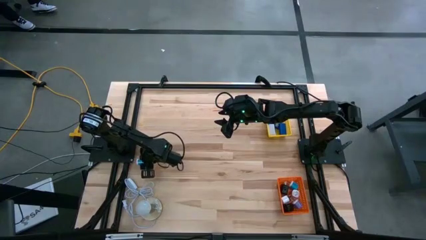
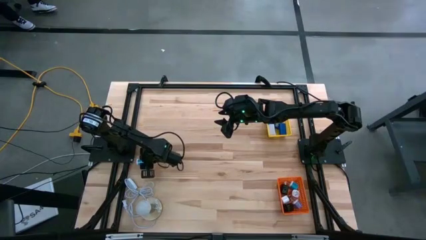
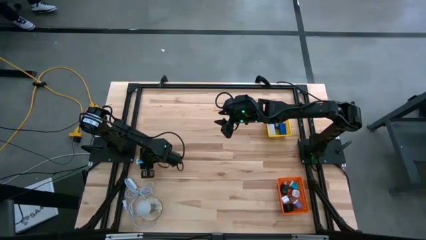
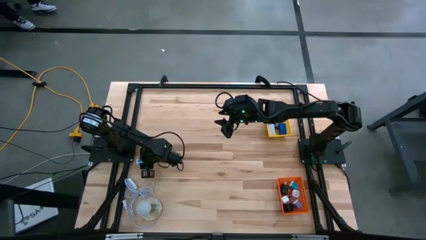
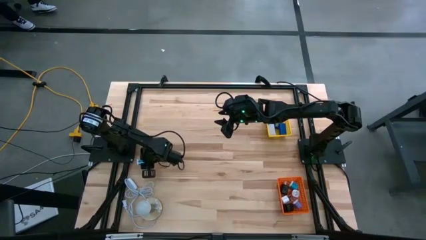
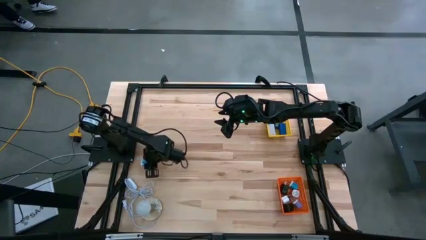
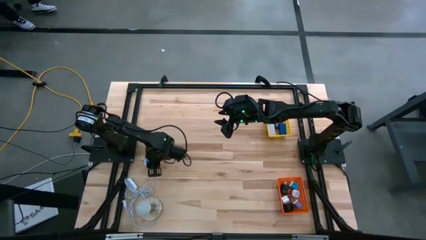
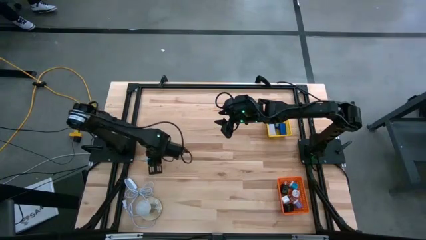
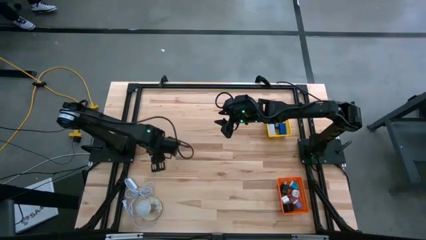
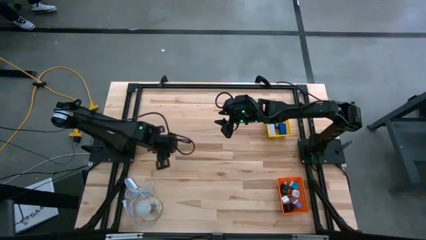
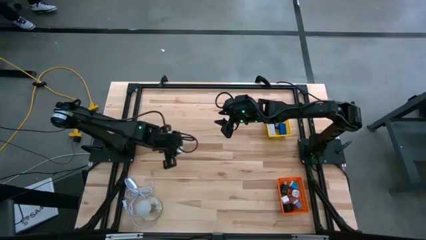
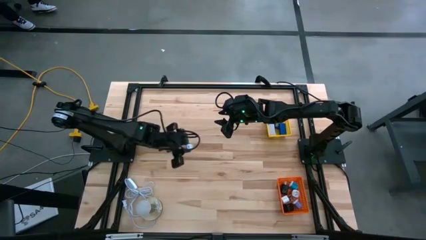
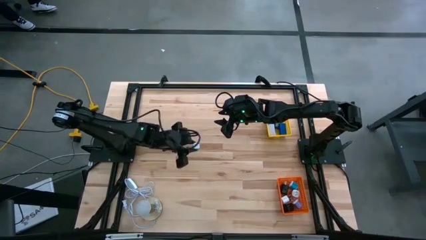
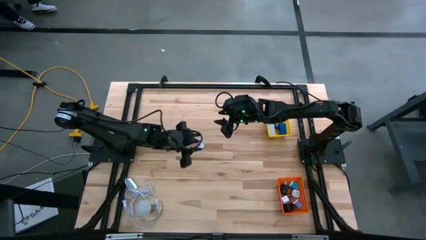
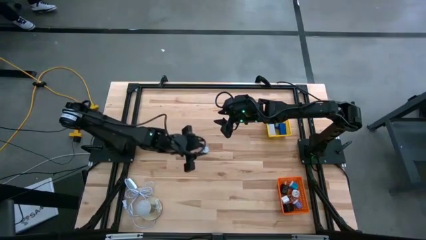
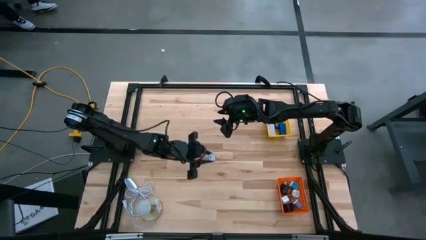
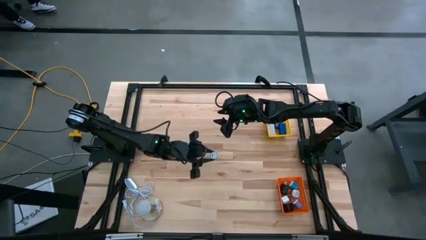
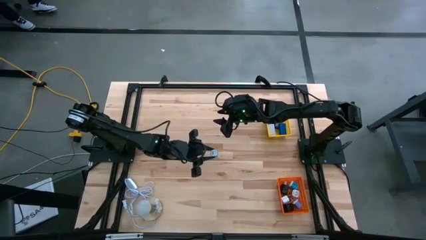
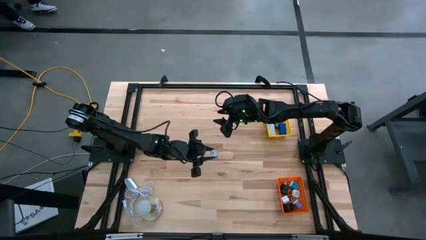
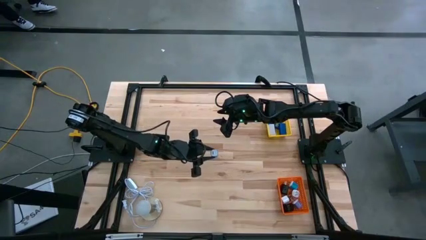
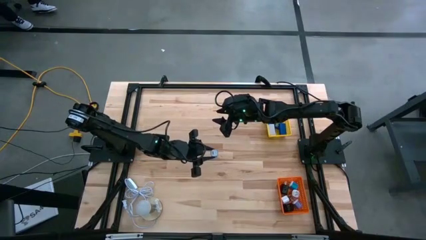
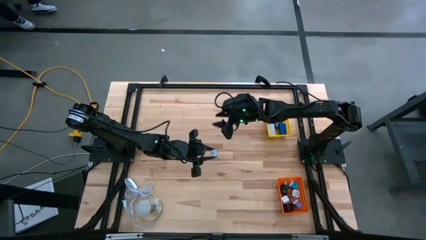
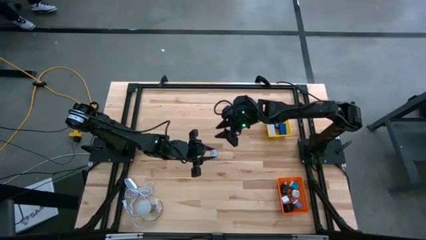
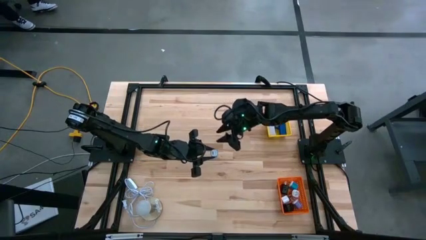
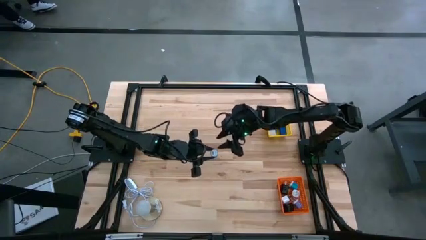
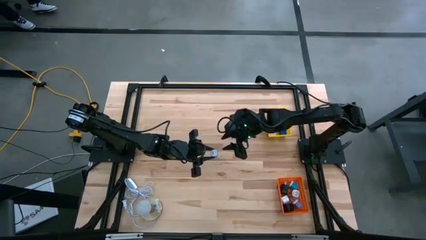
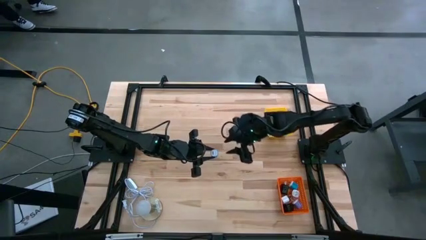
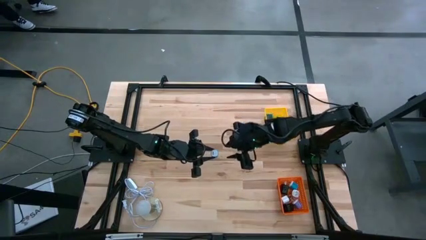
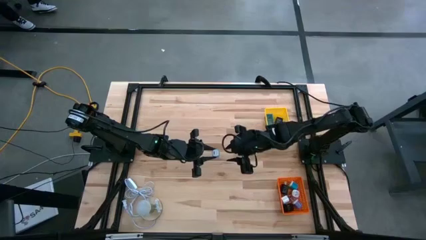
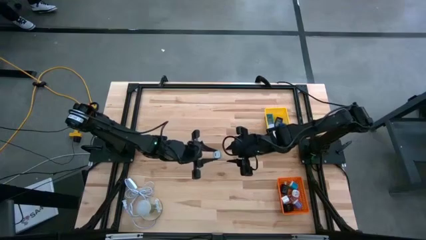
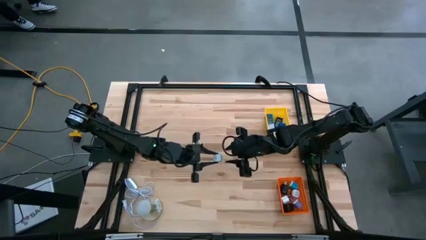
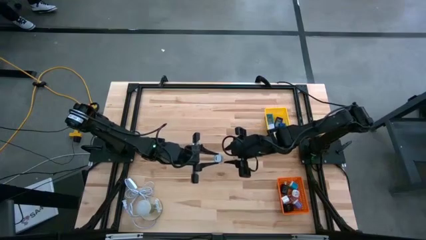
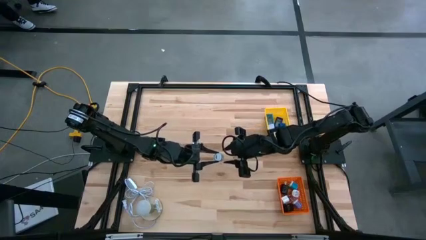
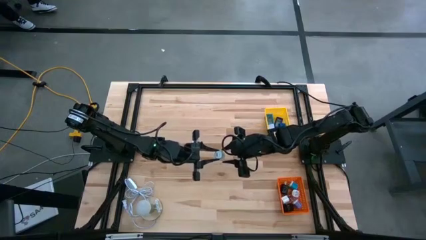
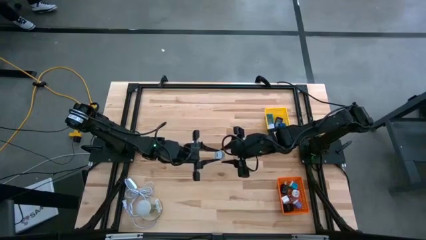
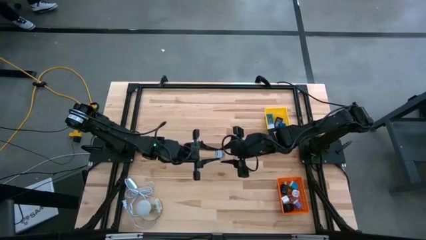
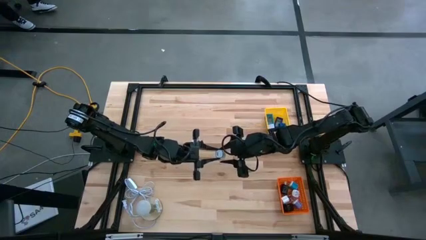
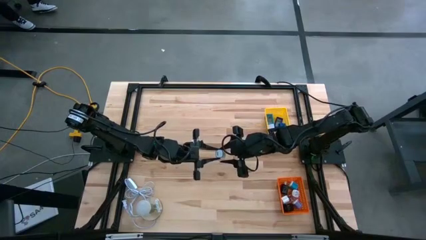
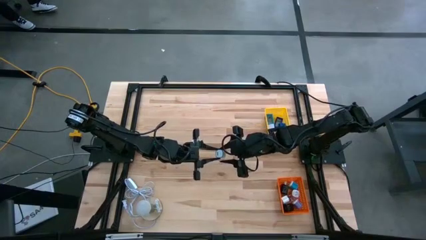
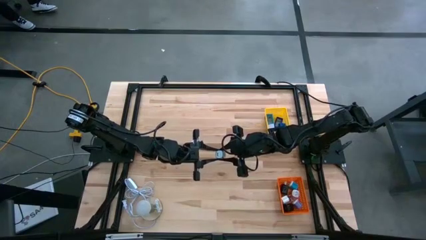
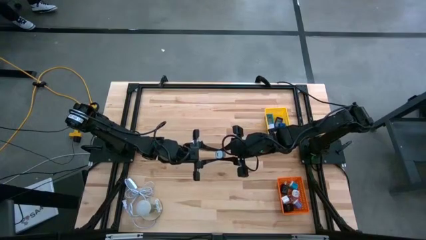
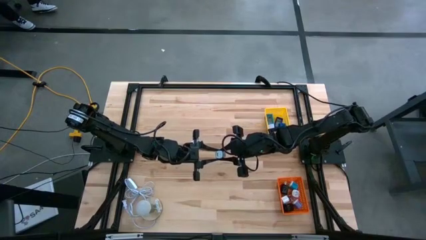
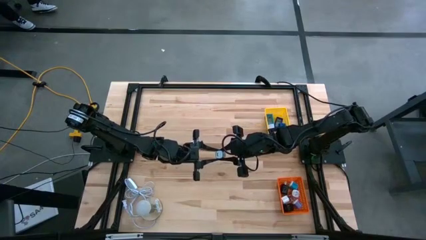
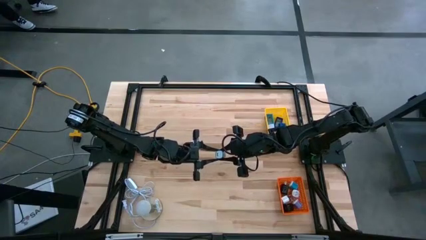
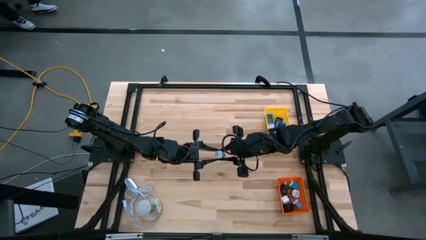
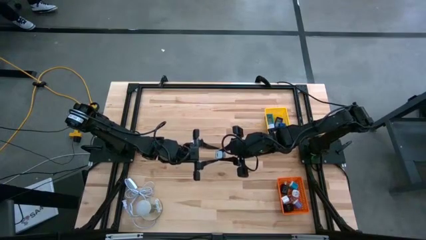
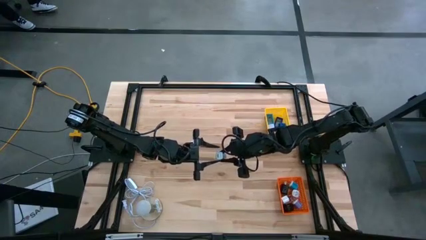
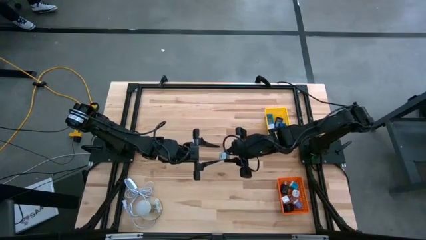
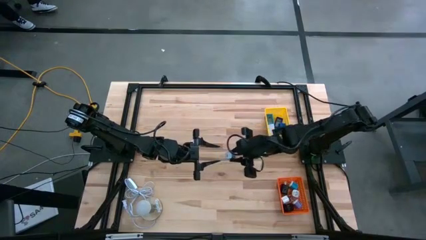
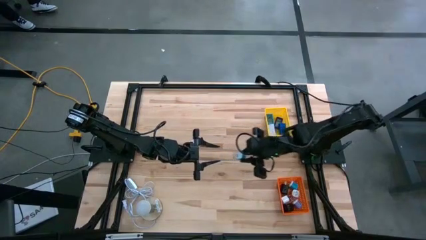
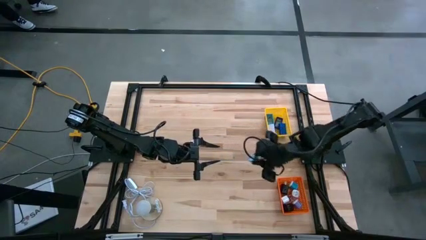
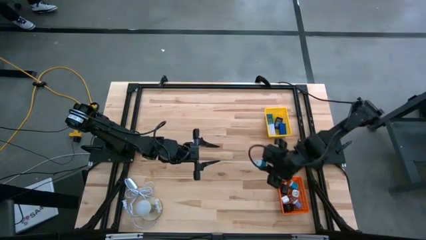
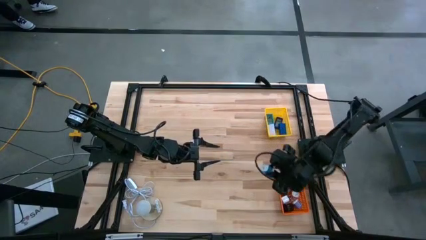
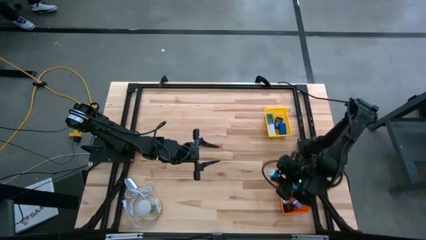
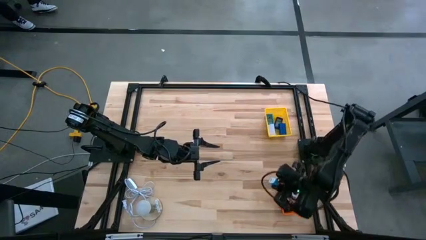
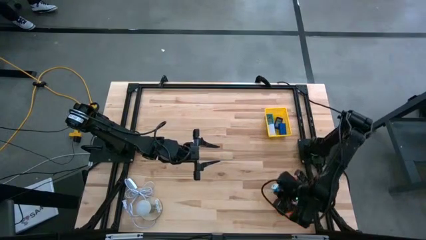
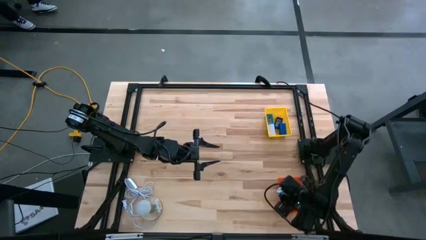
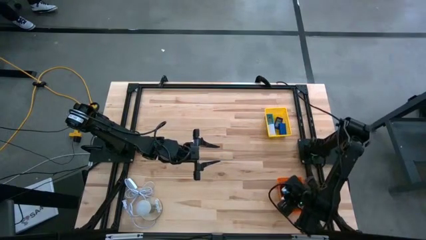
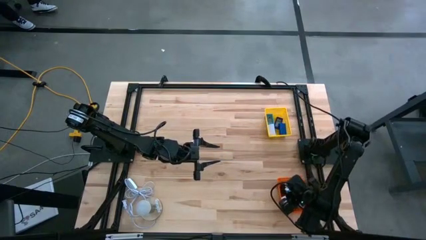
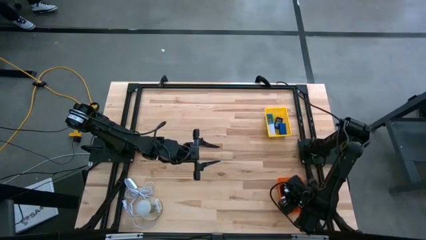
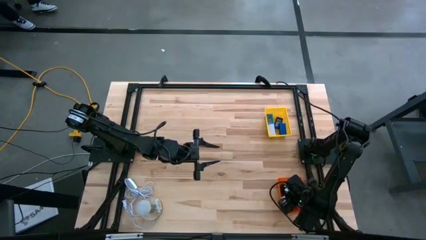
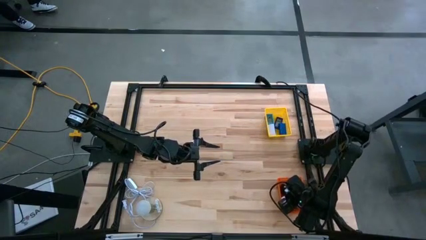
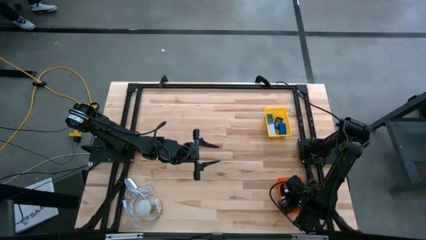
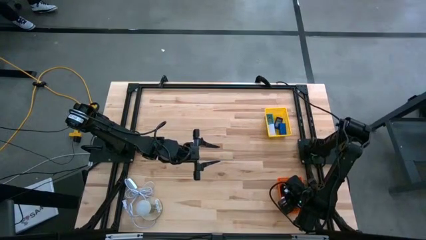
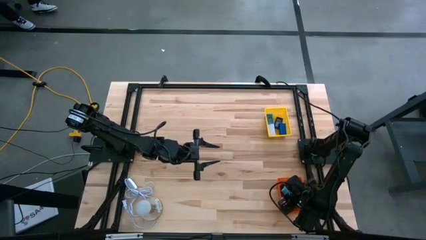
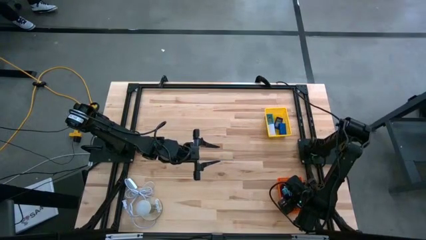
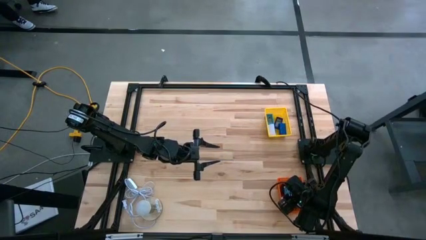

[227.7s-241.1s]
Task: Pick & Place Office items
Put the light blue charger adapter into the orange bin

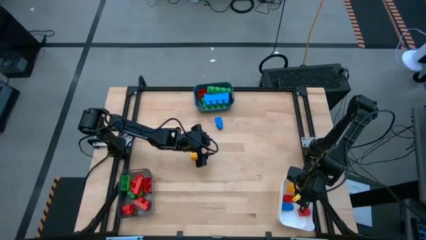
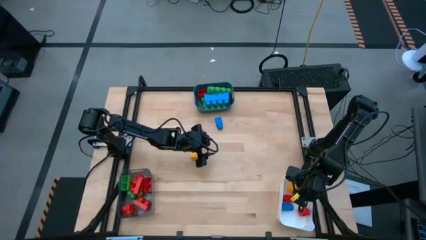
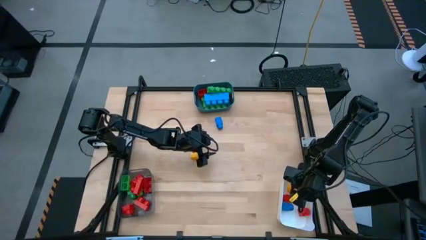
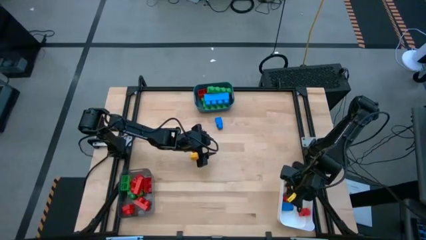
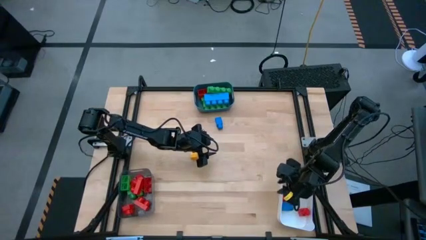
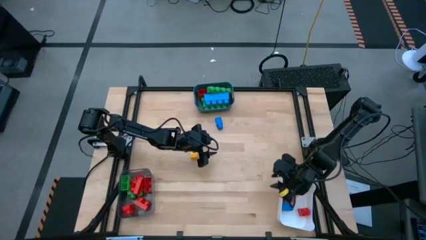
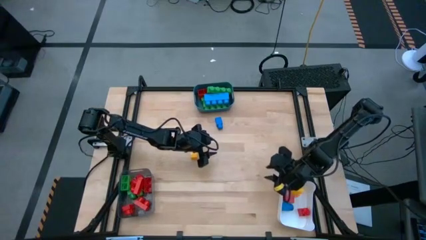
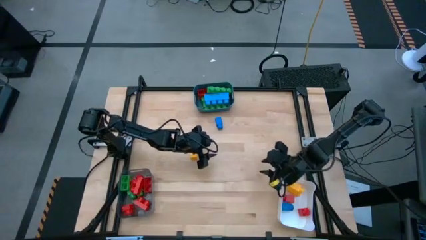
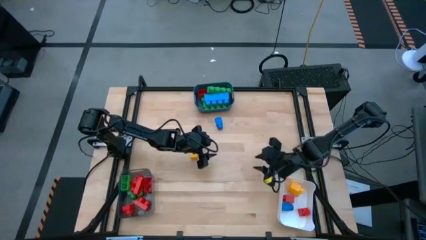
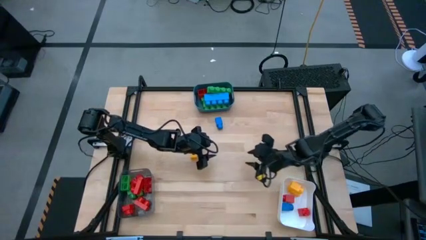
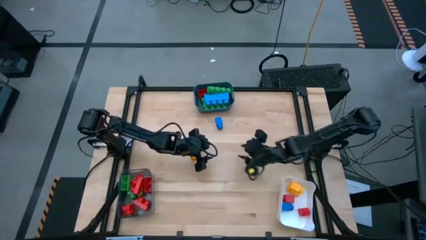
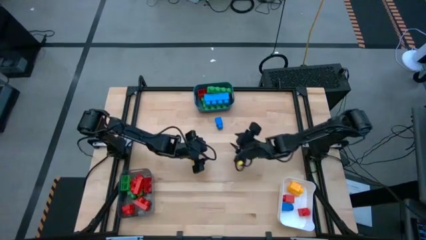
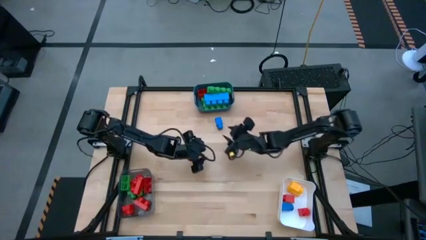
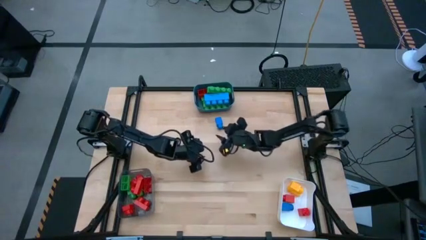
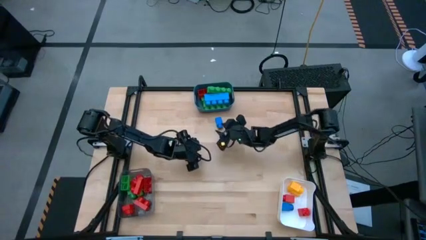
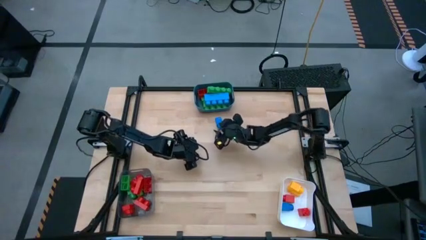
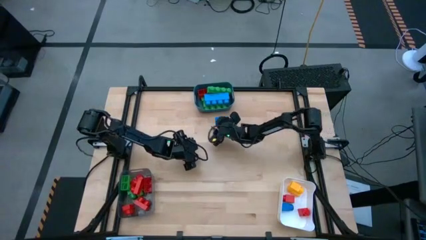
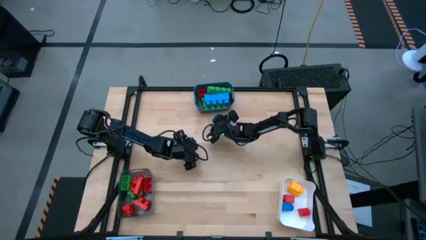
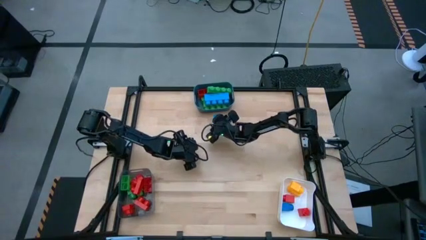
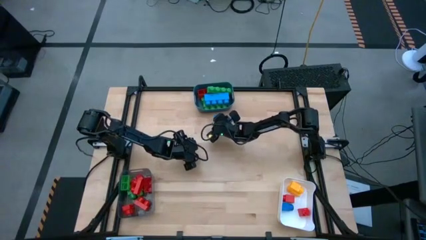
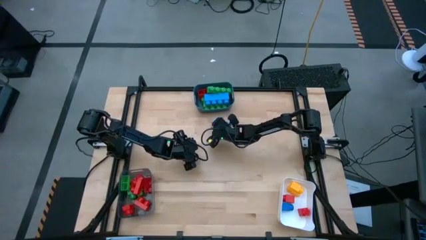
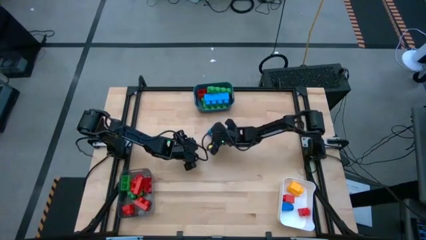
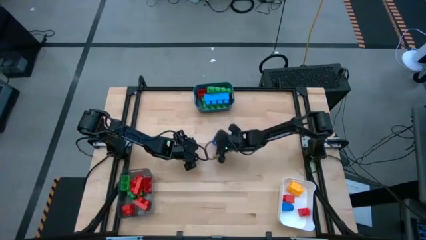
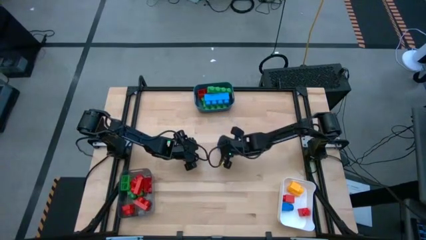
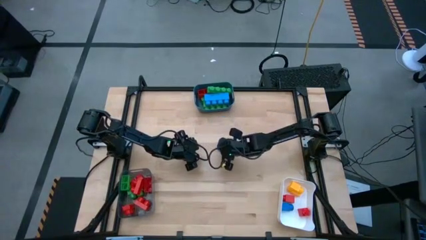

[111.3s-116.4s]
Task: Sort blocks by size
Move the blue game piece to the middle of the table
